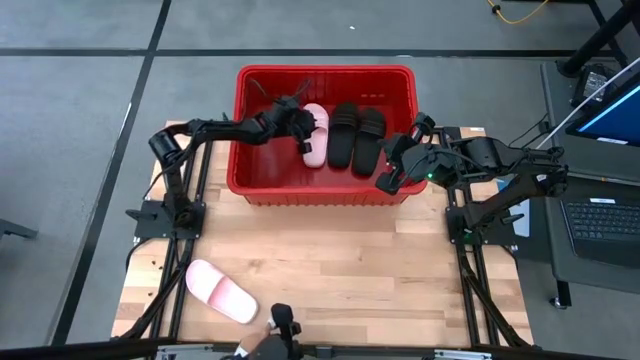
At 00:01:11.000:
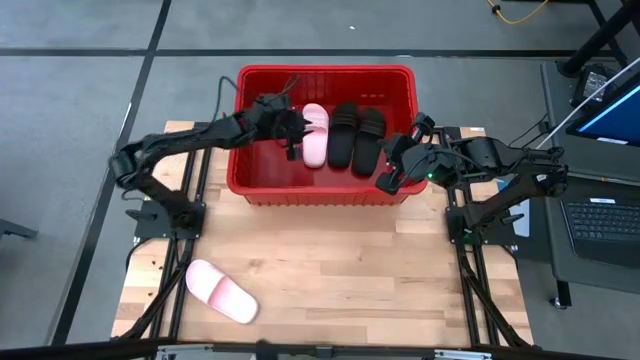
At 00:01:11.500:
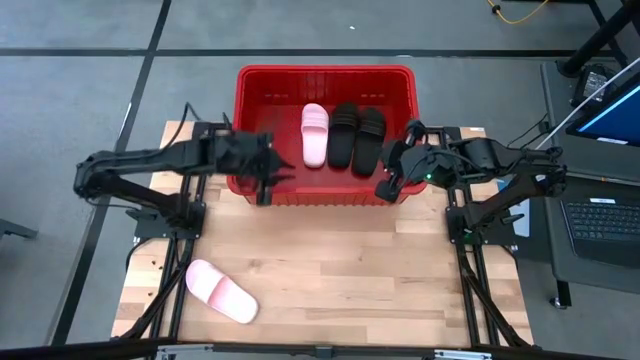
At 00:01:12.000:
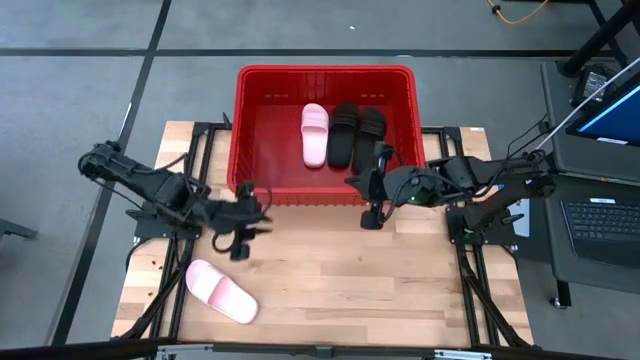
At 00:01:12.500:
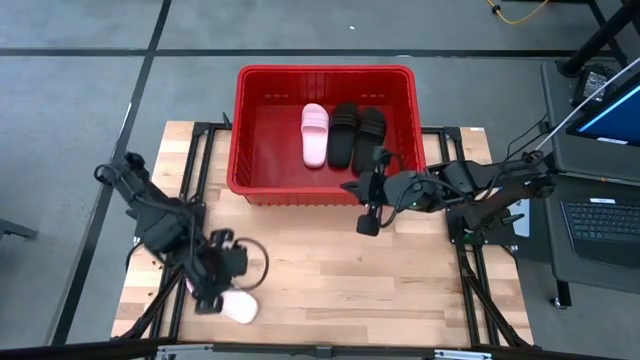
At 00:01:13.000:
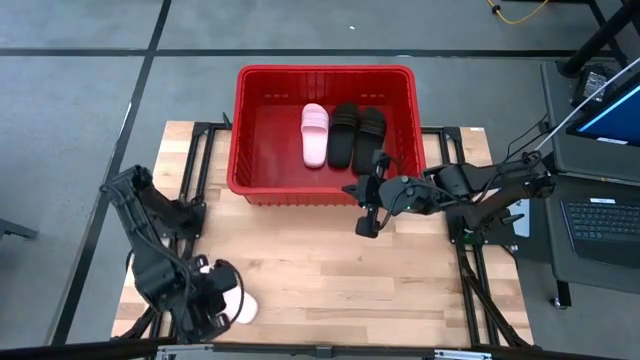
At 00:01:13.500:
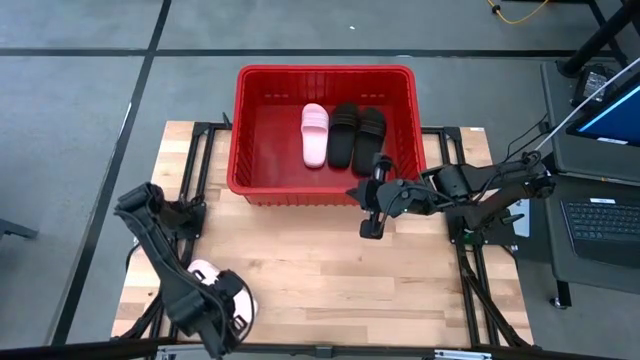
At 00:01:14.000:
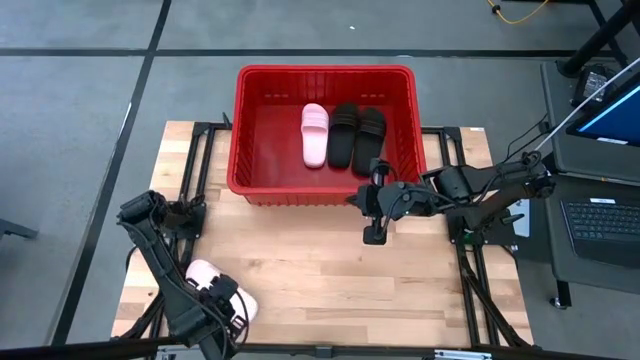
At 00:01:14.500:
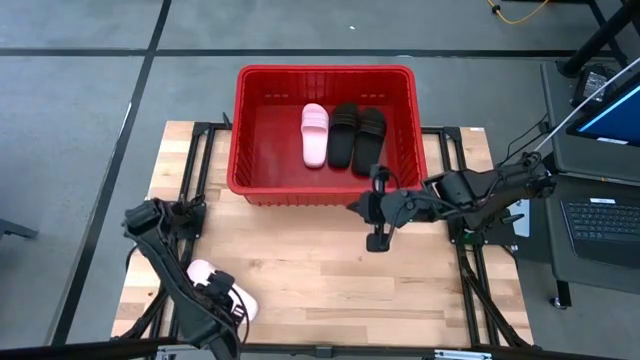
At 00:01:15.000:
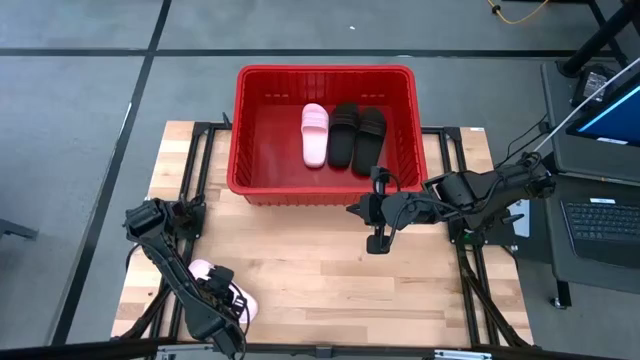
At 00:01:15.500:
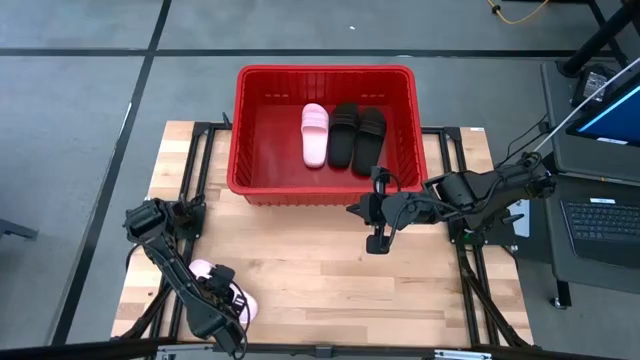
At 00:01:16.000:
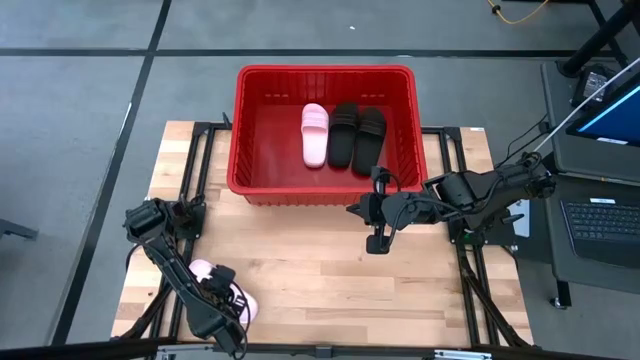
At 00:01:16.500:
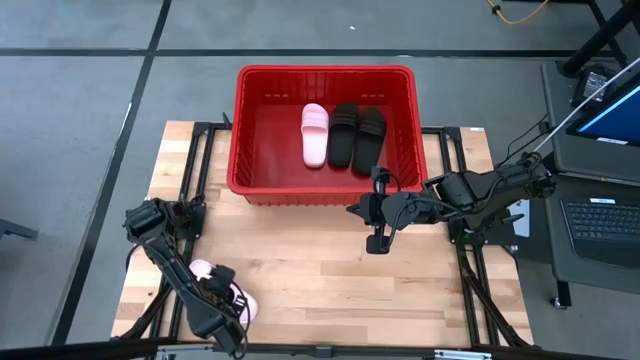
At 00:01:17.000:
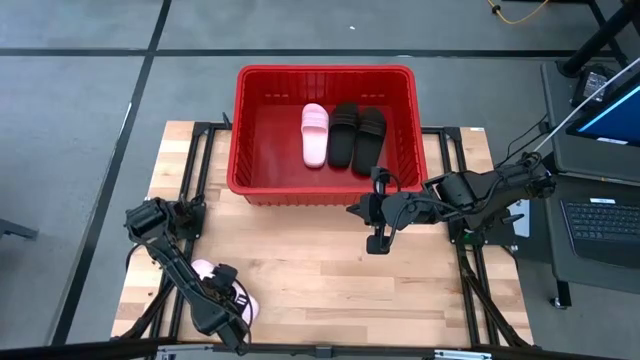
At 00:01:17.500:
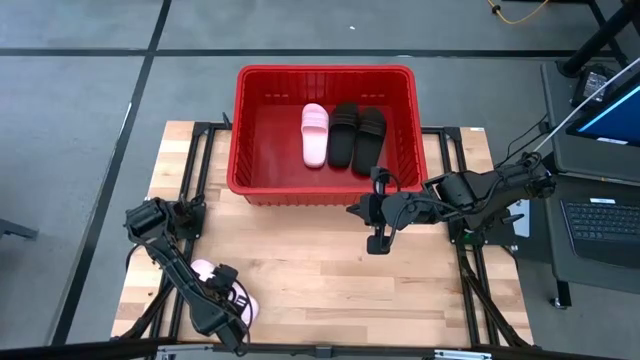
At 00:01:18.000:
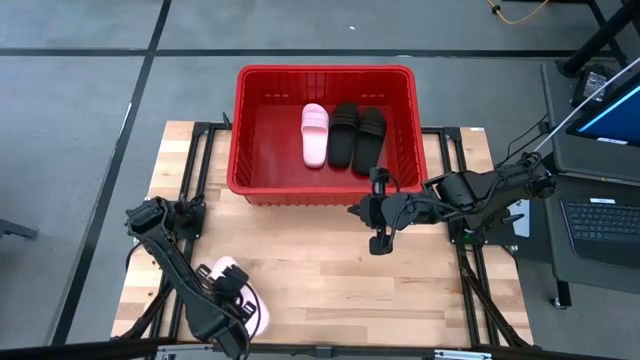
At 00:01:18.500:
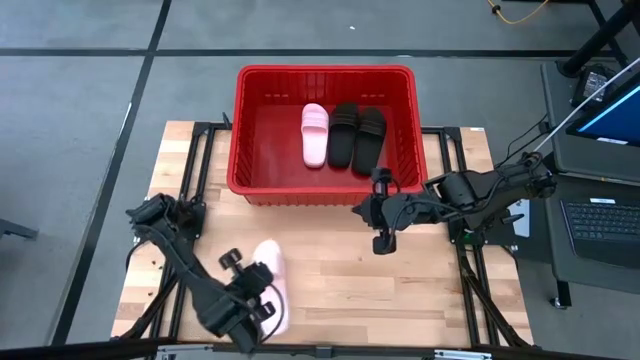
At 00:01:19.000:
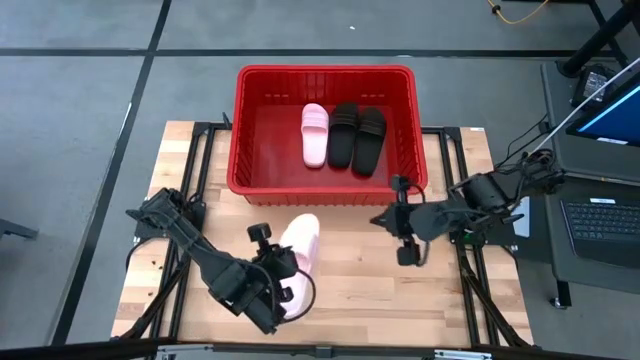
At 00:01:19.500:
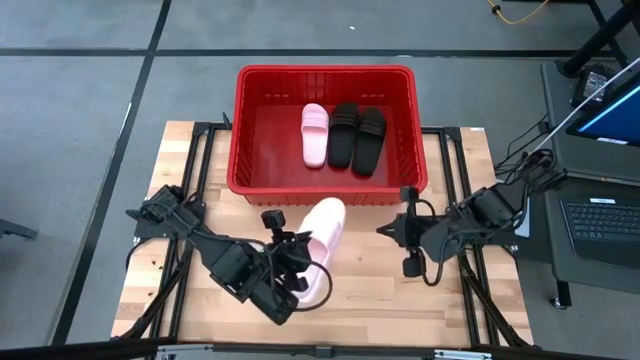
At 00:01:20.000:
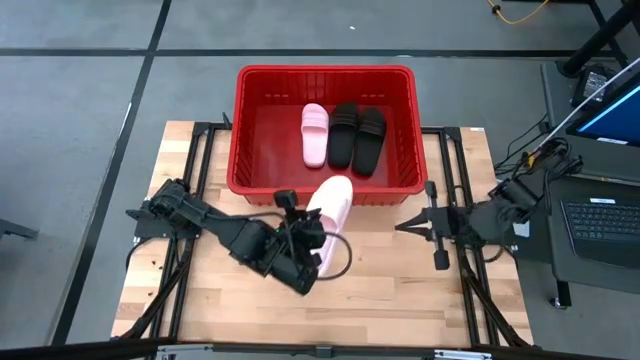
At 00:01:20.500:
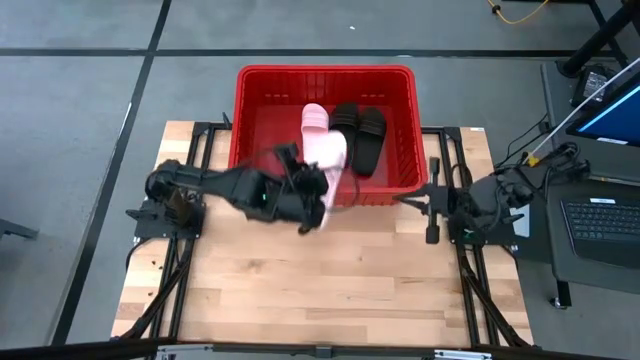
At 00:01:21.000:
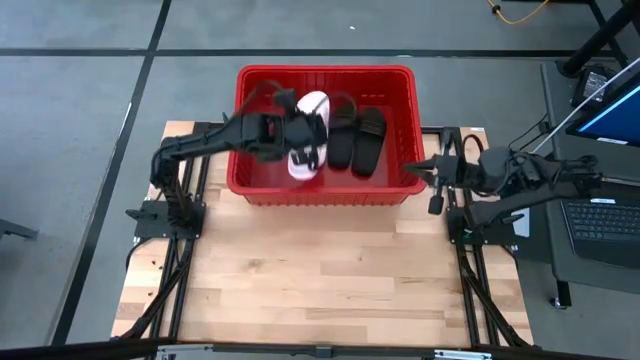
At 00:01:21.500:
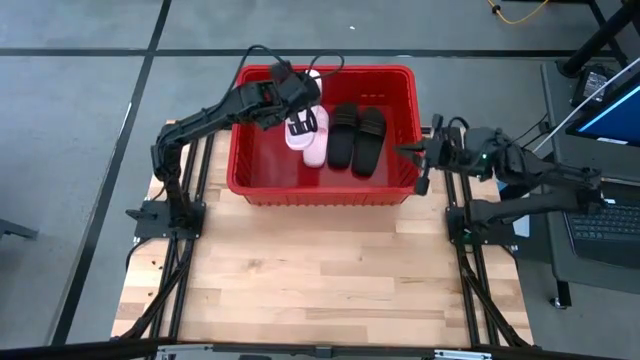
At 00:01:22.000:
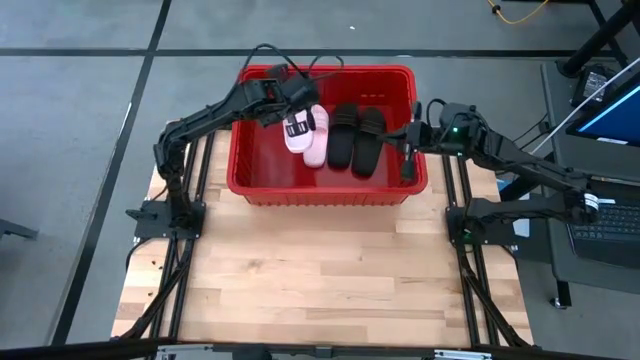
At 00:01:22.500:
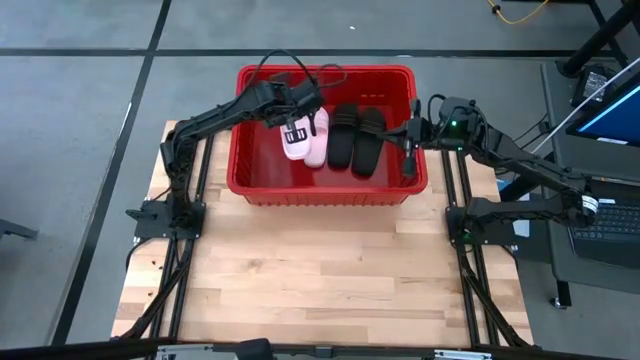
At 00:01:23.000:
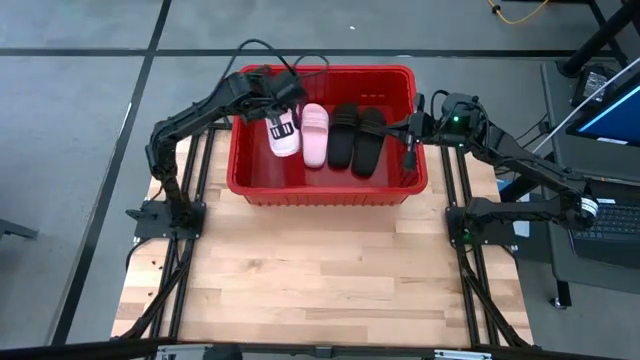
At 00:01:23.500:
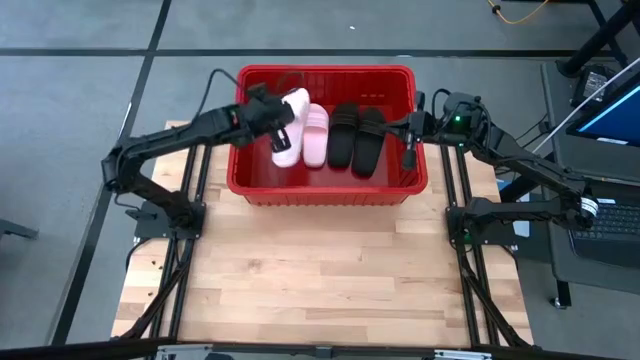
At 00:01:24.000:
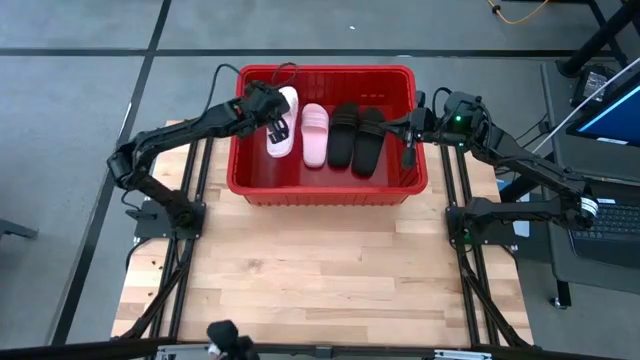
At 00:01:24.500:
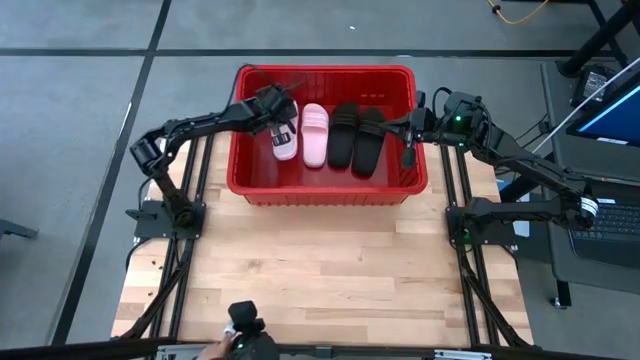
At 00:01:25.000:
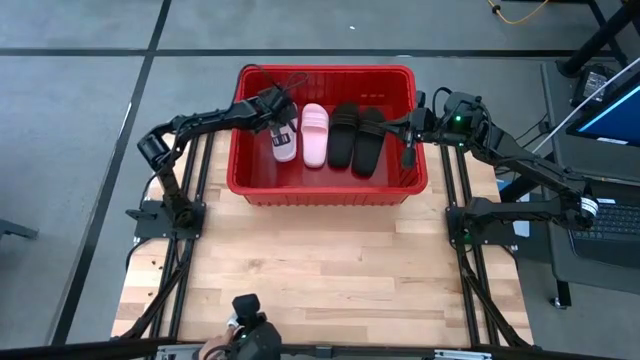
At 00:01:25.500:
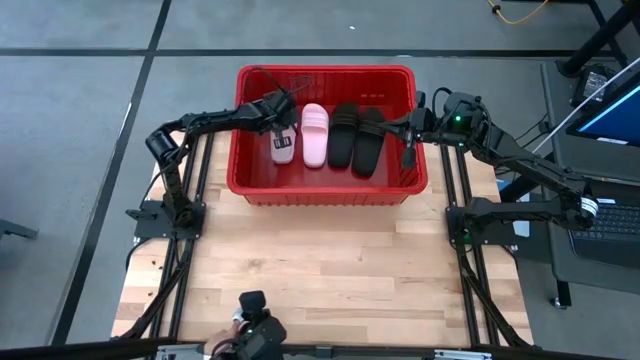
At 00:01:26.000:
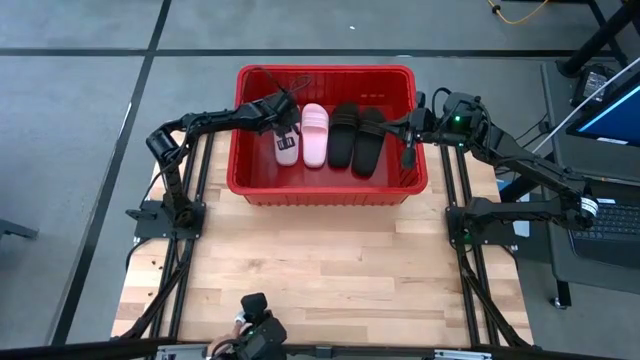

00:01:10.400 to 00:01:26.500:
Task: Pick and place slides into bin
Put the pink slide into the red bin

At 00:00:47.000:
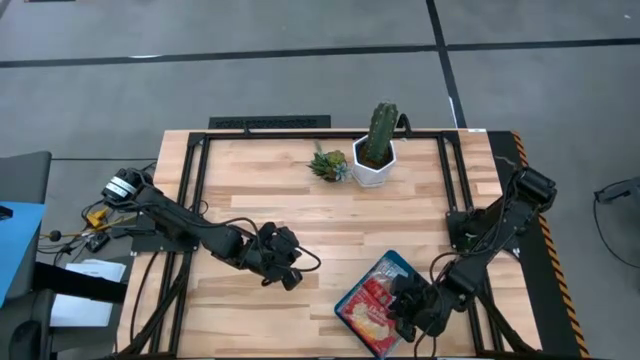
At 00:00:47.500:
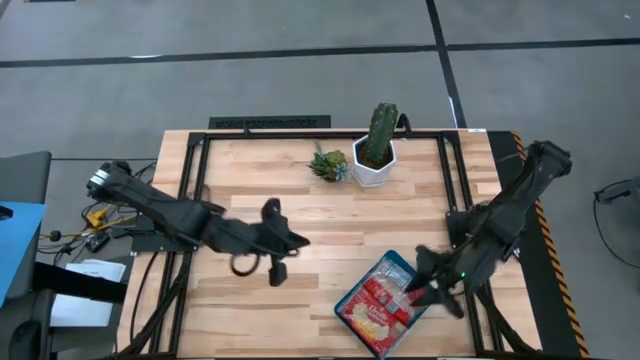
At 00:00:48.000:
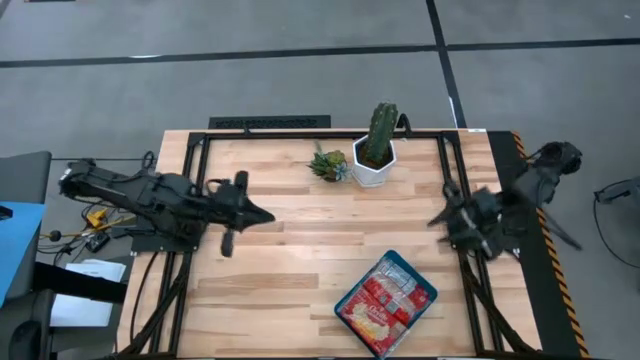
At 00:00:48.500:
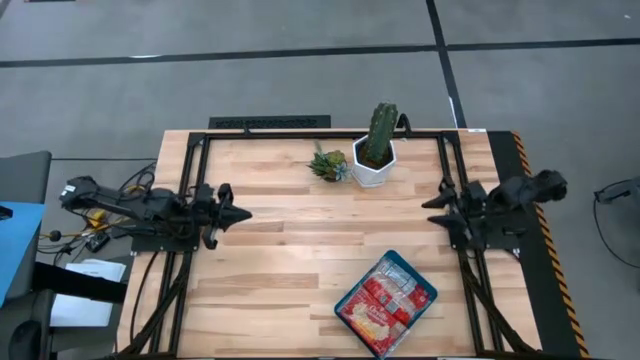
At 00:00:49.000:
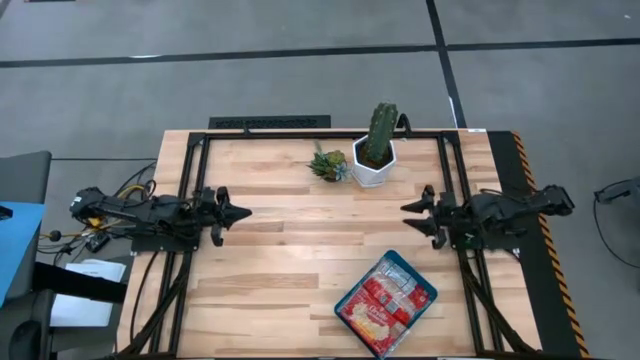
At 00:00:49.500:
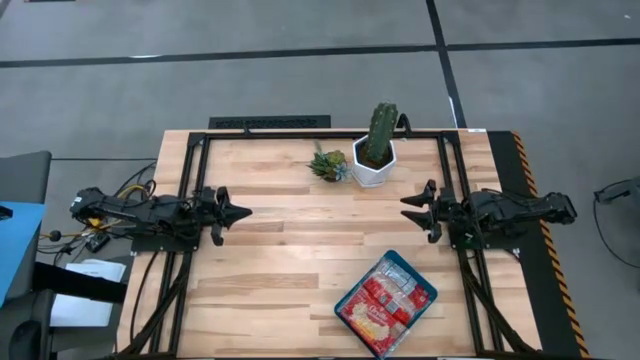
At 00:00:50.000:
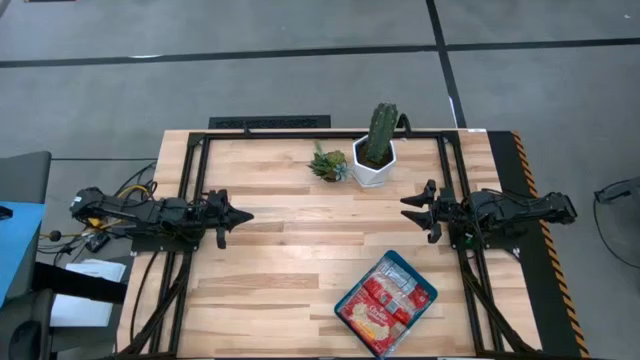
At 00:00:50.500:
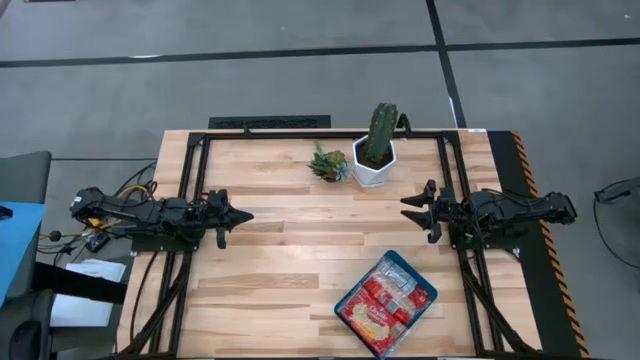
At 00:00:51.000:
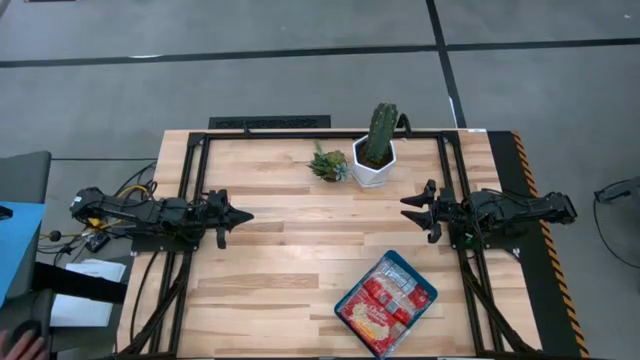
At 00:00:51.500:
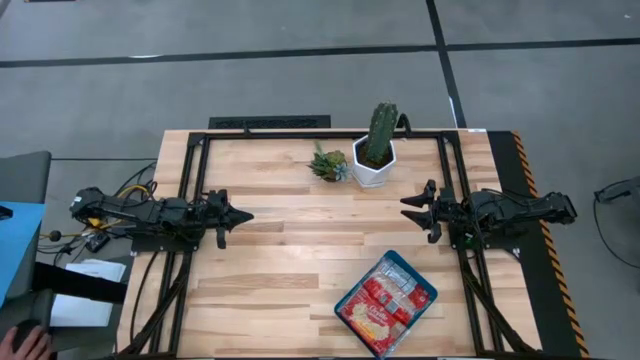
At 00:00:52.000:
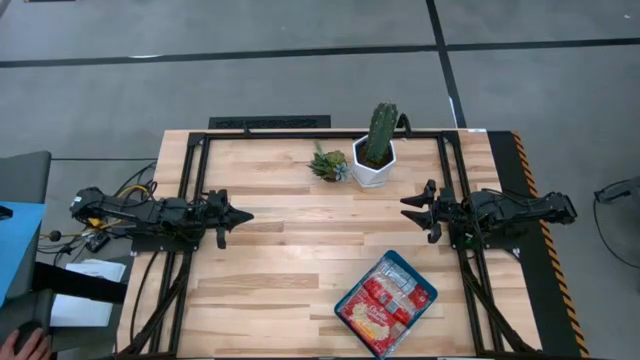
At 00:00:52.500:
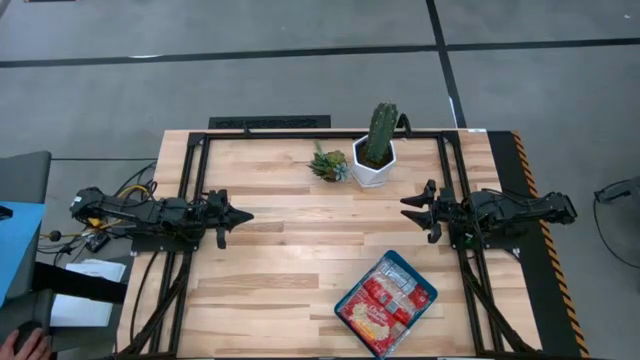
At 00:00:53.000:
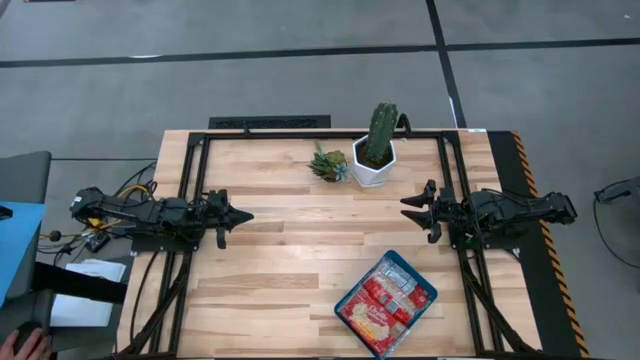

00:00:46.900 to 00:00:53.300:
Task: Sort popcorn bags into baskets
Return to Home Position
